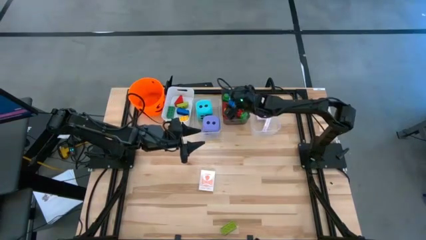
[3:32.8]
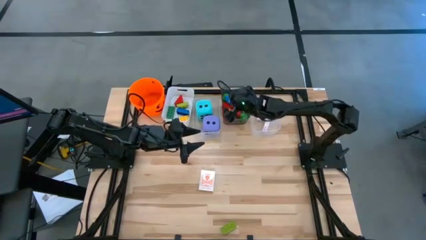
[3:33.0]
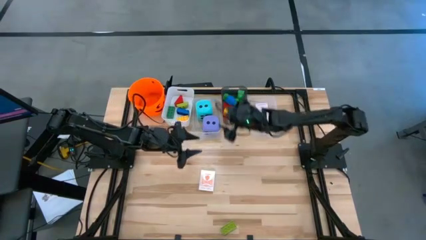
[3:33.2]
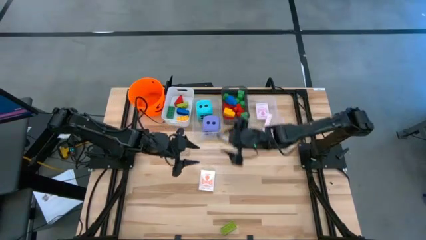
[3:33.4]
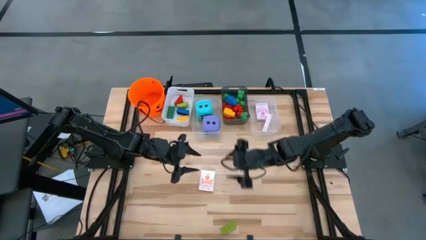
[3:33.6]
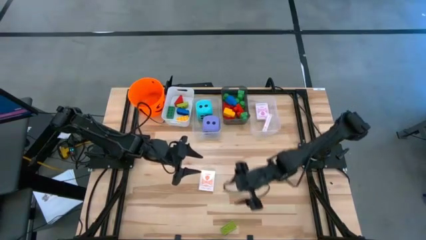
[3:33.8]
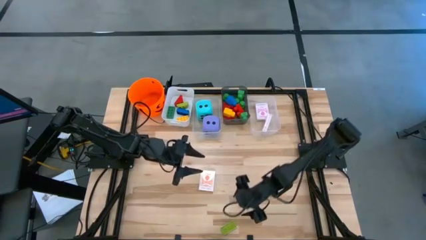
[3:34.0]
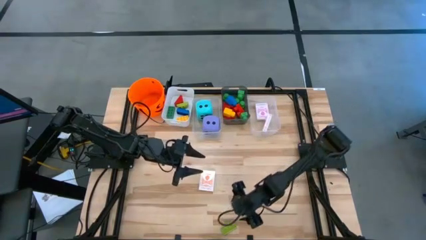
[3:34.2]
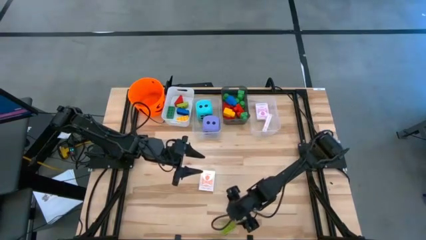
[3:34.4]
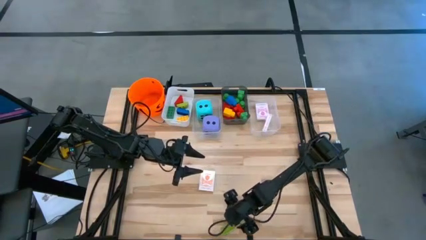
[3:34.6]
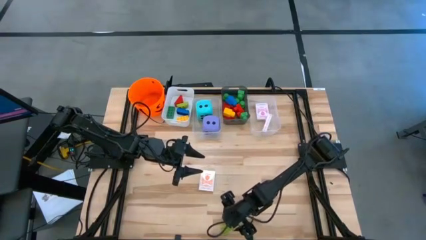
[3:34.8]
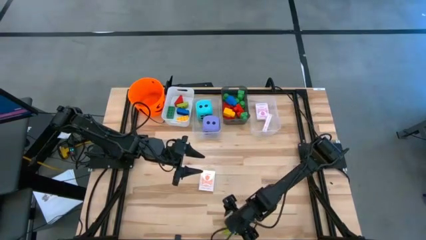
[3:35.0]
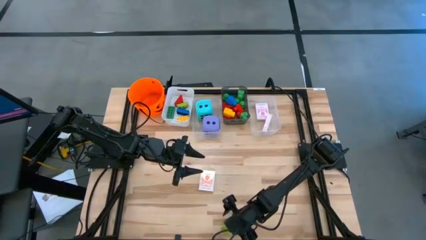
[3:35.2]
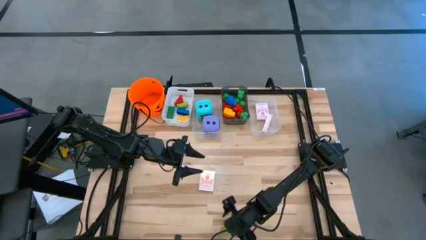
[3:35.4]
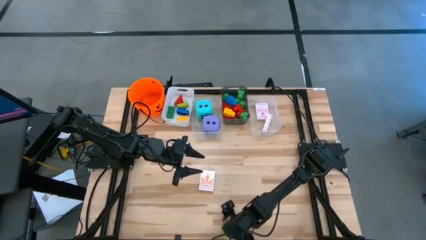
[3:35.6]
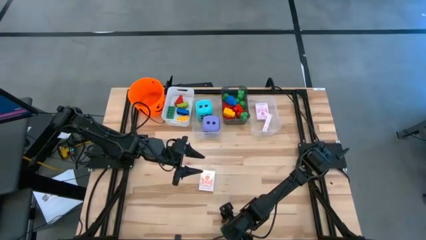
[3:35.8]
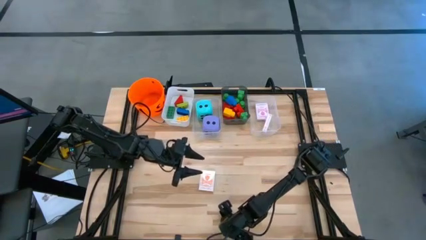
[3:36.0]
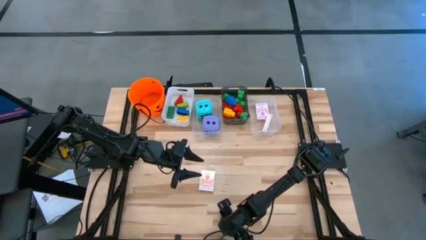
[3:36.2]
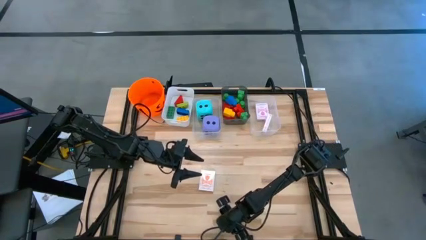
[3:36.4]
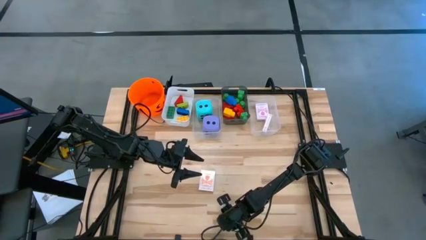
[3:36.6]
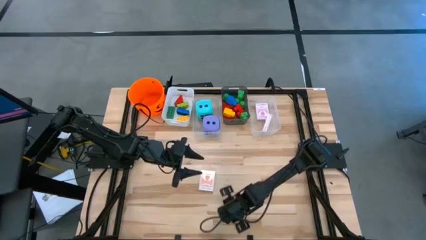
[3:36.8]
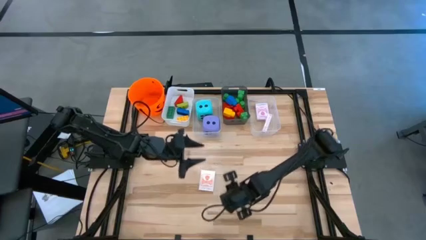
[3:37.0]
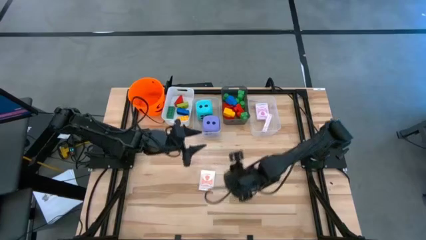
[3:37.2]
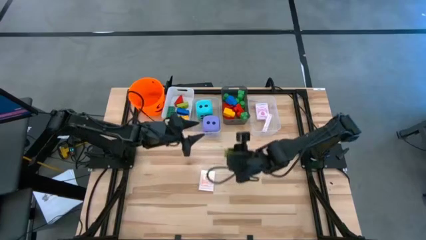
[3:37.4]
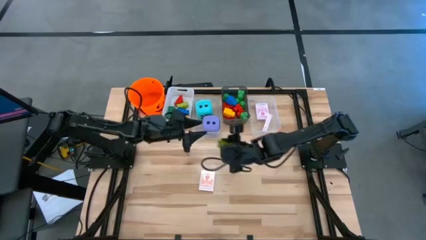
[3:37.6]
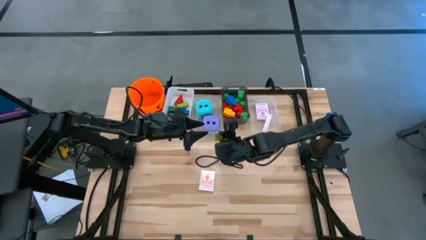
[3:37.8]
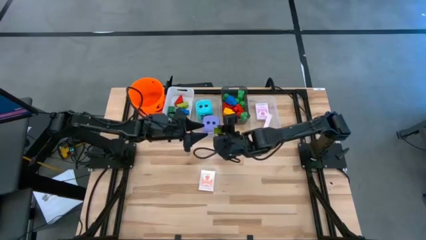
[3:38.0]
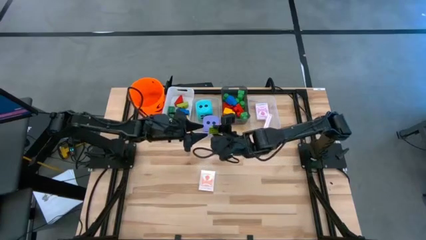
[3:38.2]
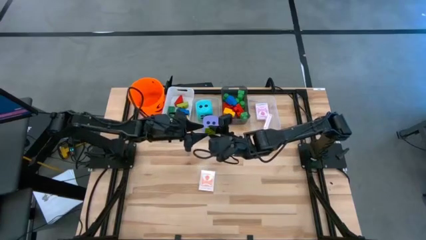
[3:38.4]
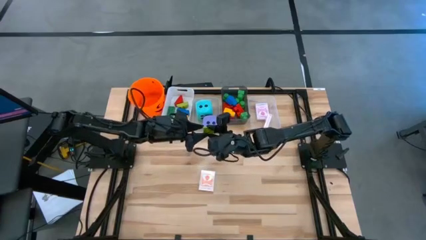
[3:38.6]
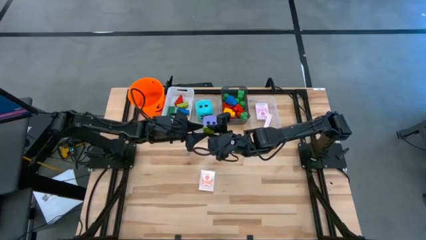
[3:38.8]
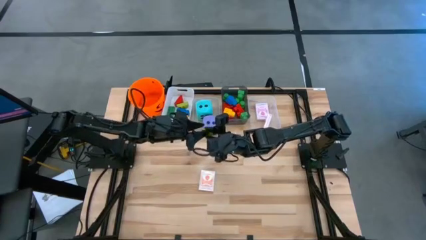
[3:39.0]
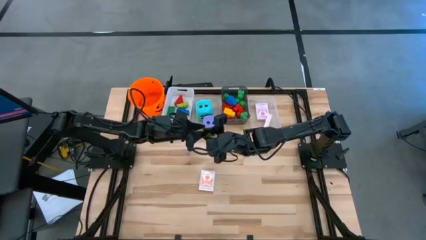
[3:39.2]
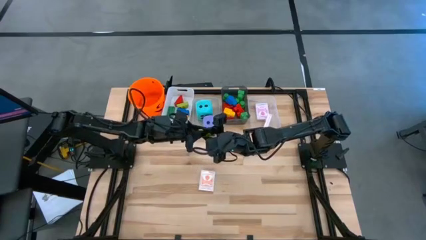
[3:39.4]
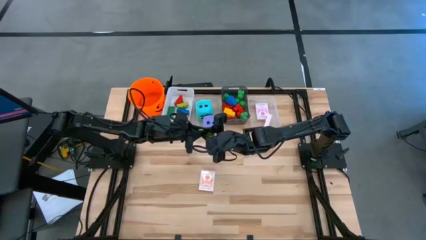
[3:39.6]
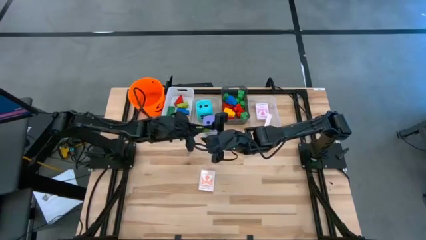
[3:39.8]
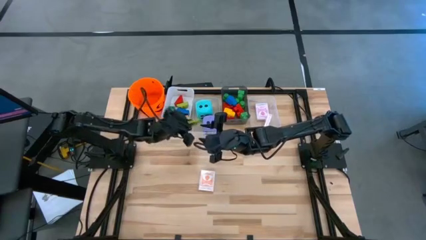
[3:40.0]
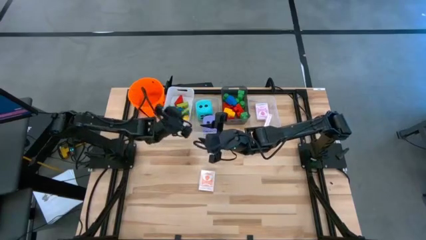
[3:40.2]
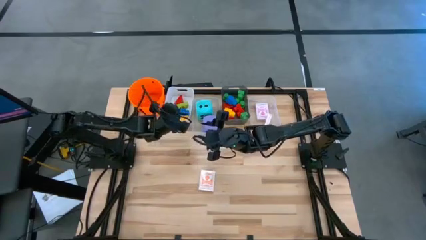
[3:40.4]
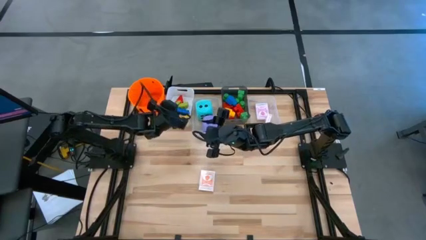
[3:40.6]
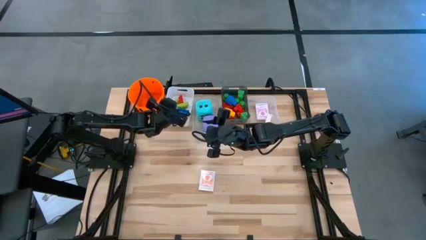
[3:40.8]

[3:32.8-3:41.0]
Task: Pick & Place Toys
Put the small light green game piece into the white bin

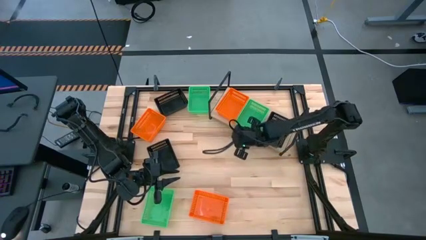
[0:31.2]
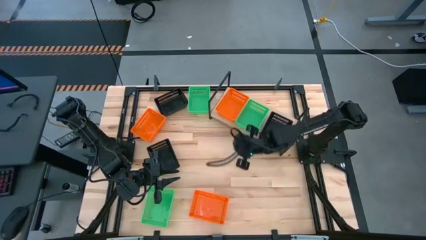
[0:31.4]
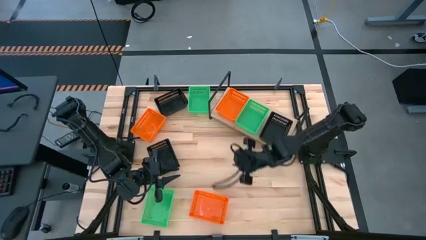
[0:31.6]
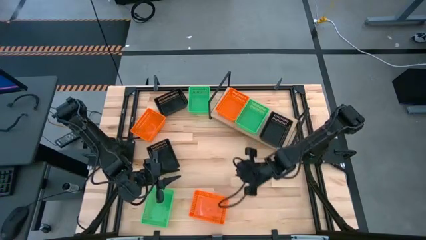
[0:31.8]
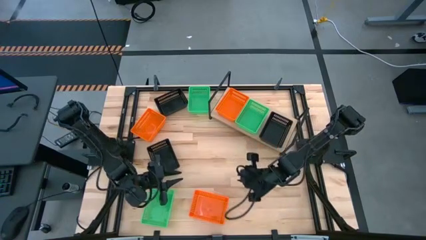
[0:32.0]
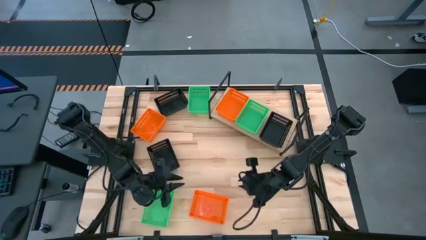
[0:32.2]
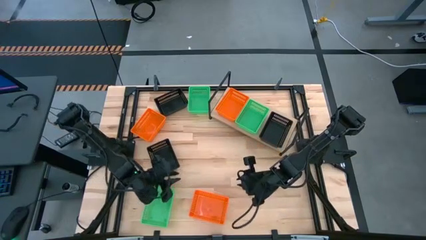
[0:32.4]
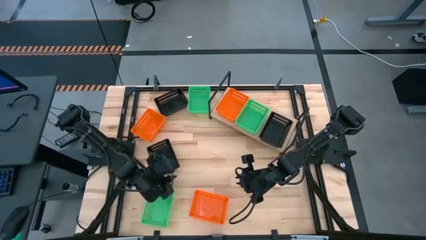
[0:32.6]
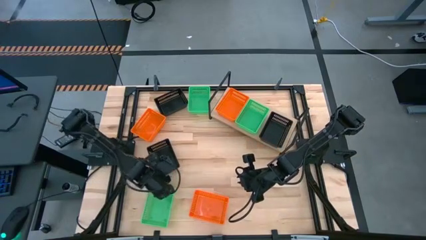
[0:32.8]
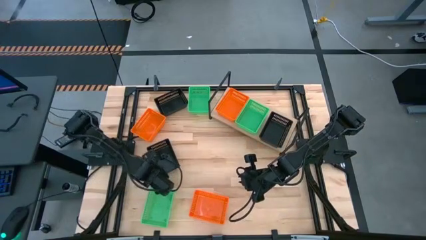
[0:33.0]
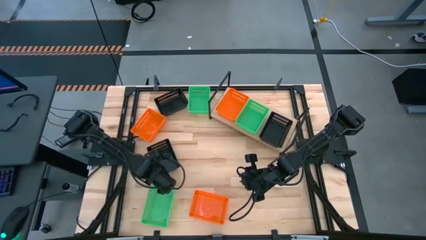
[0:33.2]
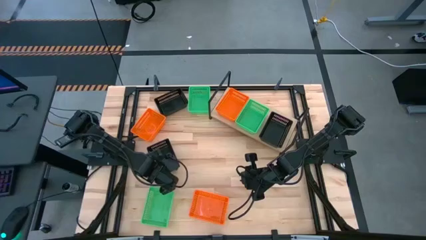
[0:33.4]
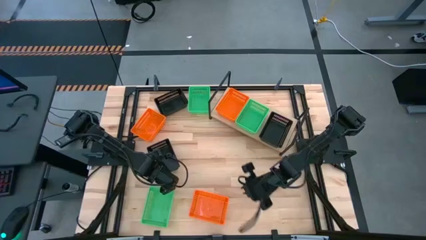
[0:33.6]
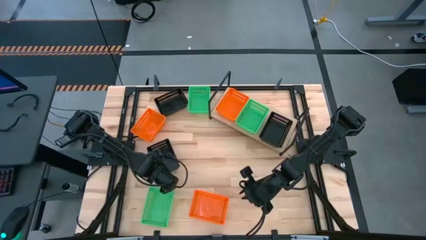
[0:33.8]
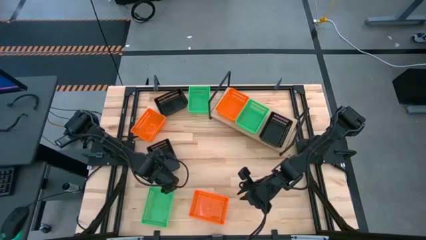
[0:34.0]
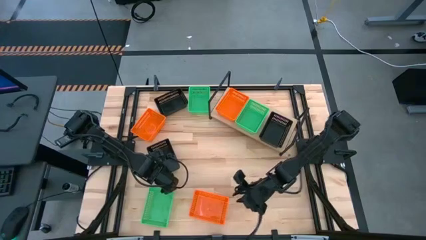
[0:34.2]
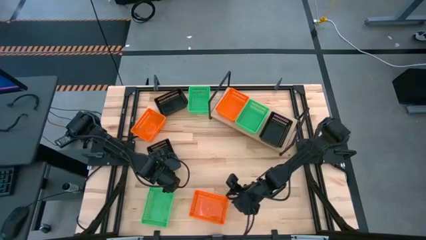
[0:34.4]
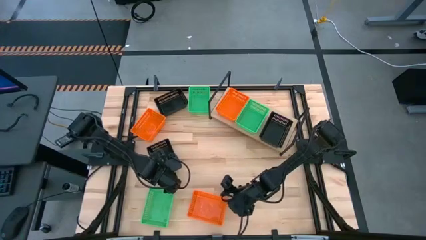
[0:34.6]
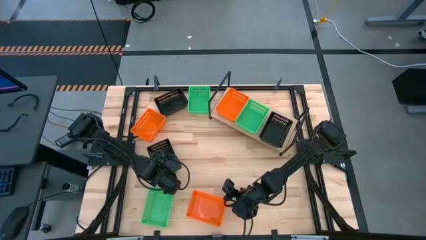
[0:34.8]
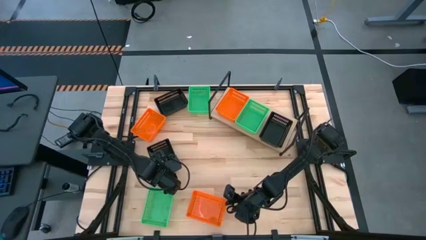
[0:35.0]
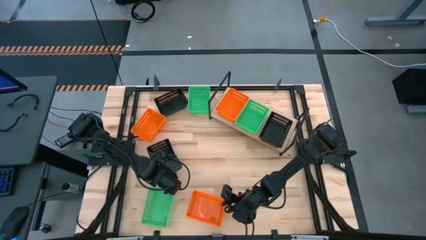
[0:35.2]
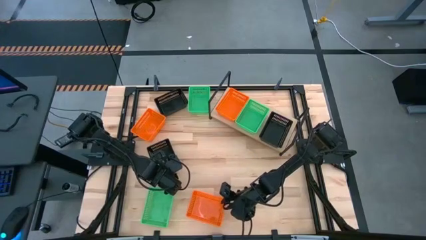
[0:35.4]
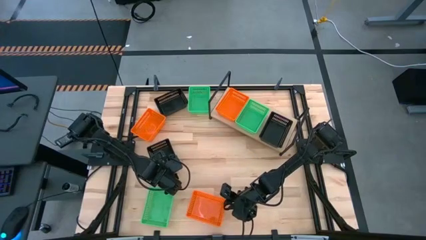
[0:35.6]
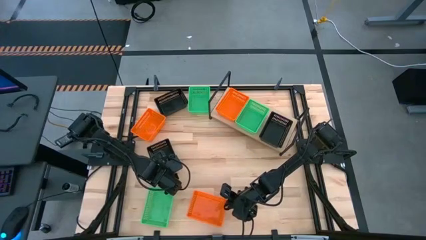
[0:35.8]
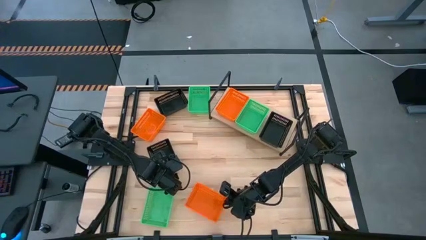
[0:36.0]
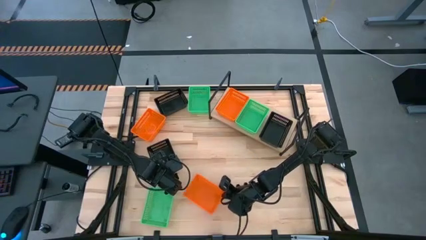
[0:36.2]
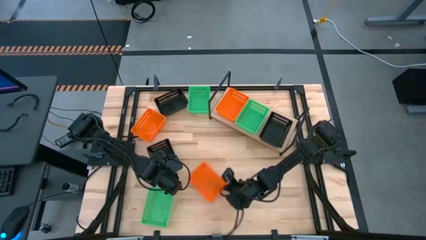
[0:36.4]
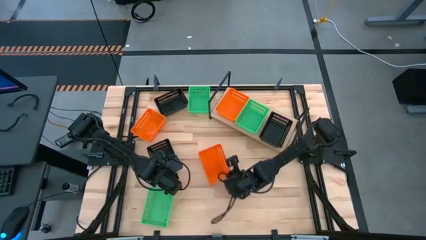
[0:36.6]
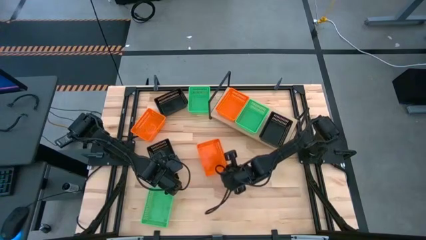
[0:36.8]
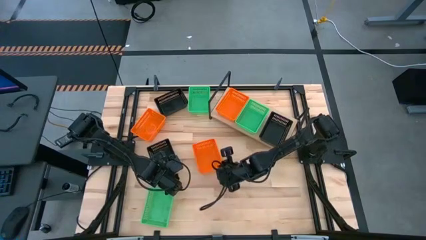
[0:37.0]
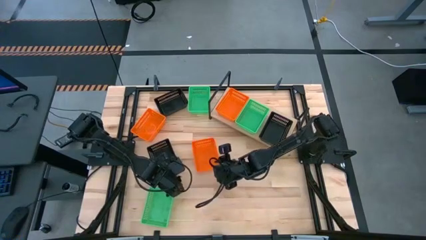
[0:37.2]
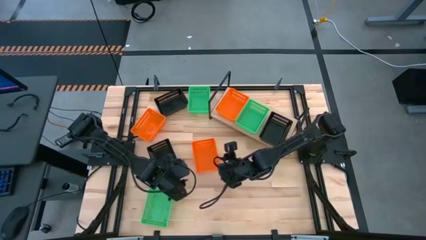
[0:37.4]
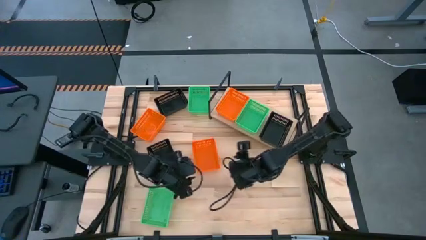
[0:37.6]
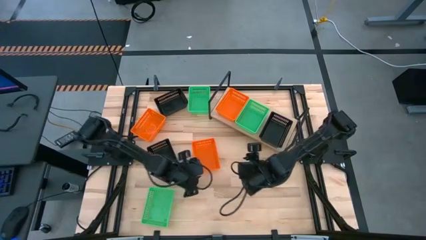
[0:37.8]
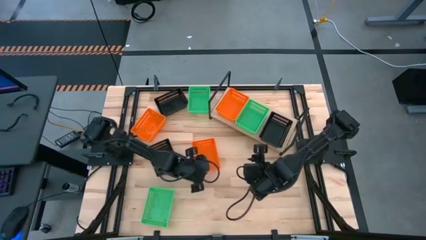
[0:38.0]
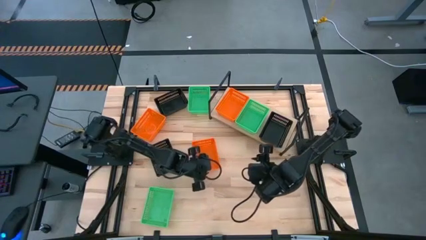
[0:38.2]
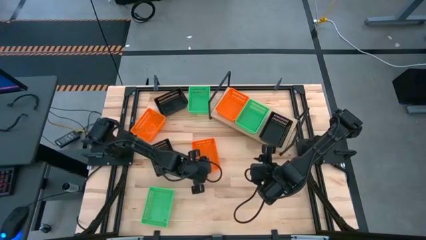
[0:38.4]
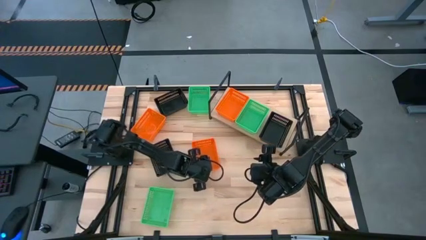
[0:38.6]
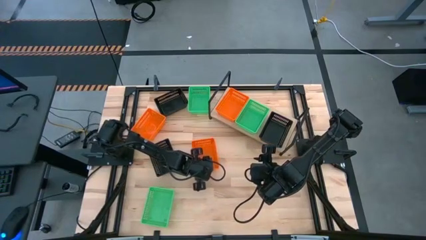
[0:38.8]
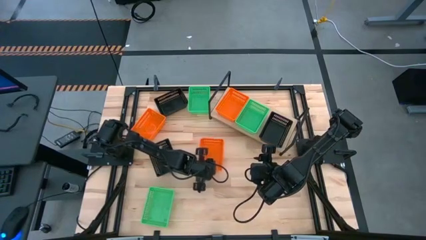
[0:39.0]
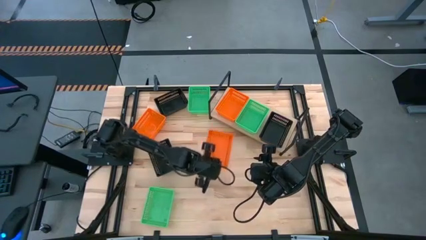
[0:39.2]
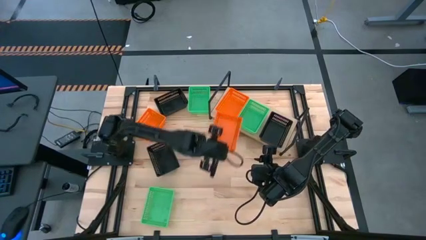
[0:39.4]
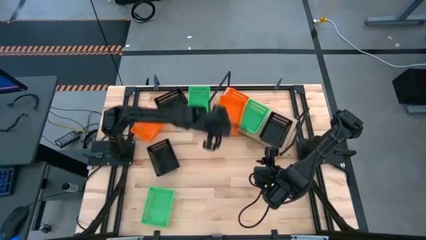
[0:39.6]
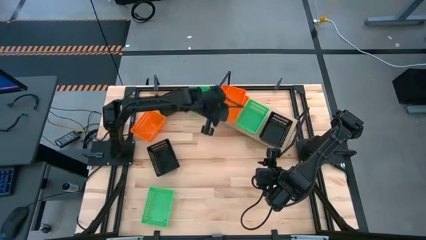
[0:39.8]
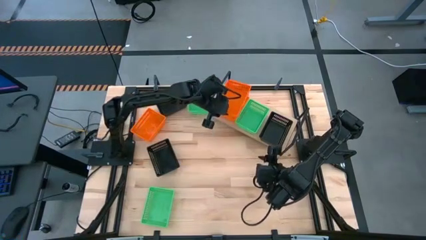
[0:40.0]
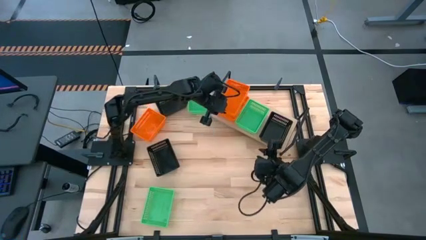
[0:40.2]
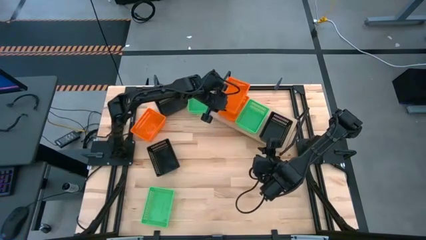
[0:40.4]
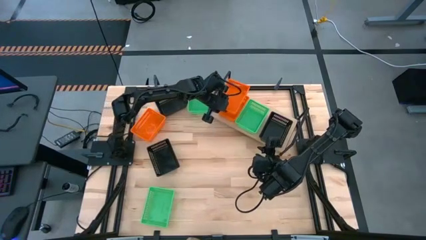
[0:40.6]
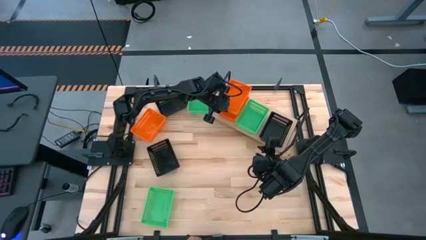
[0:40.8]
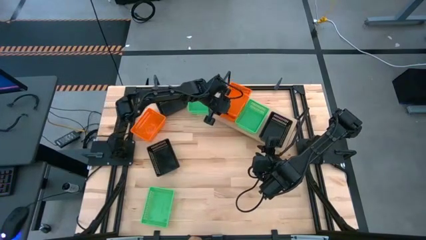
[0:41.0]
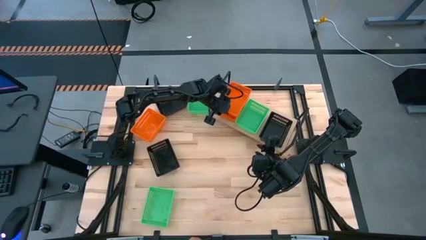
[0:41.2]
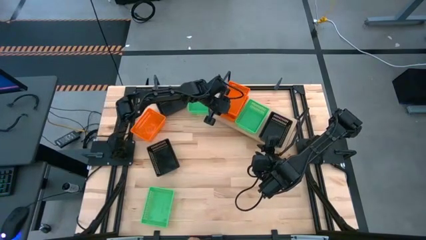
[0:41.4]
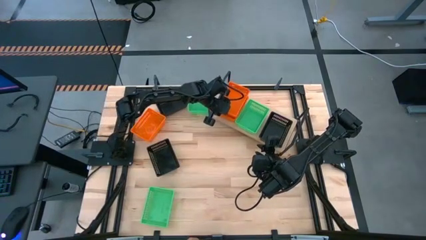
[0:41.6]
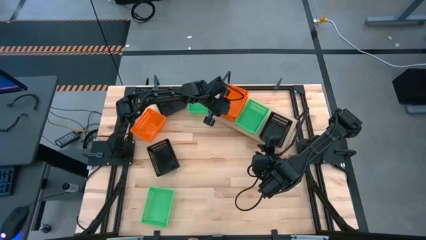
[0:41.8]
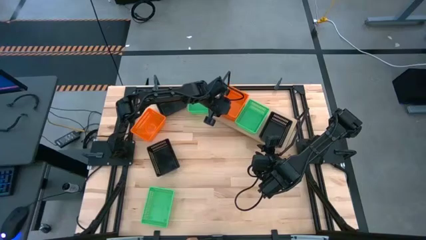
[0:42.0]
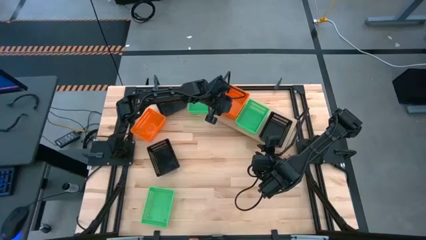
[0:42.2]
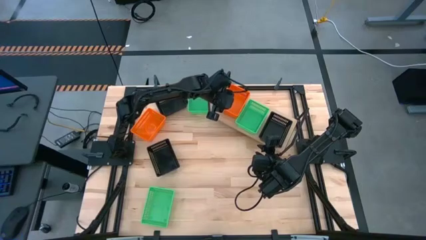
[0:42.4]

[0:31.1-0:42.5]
Task: Stack baskets on shelf by color
Stack the bottom orange basket on top of the orange basket on the shelf
